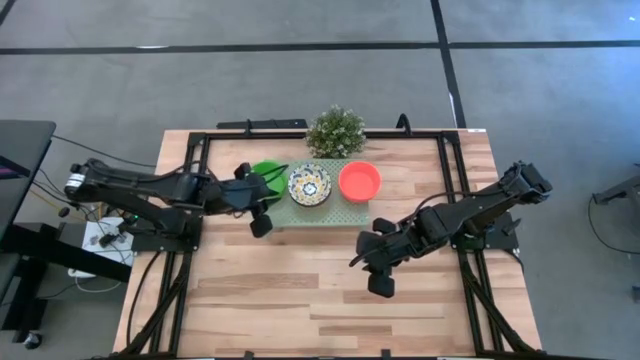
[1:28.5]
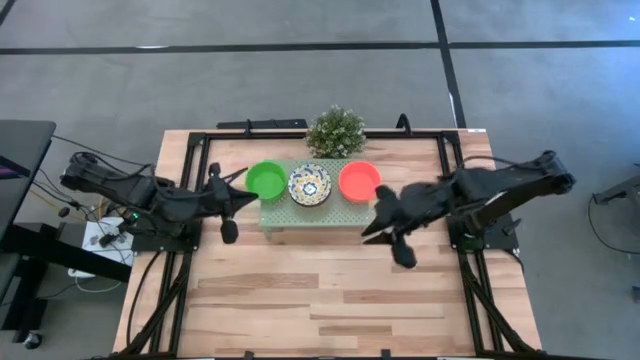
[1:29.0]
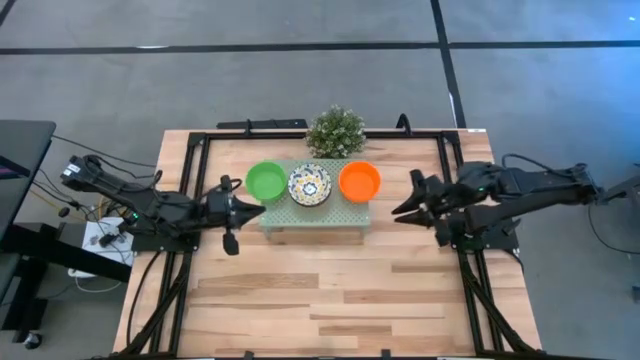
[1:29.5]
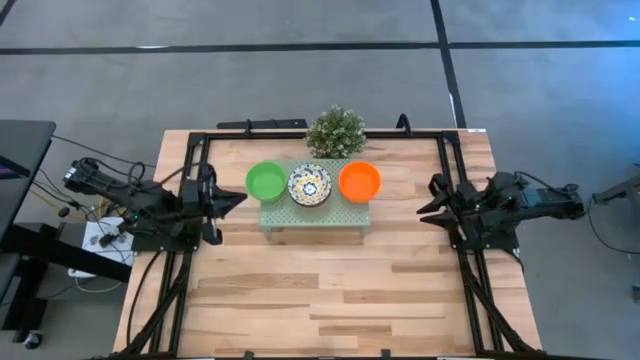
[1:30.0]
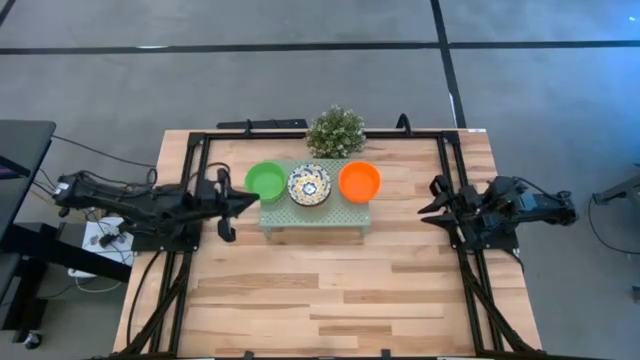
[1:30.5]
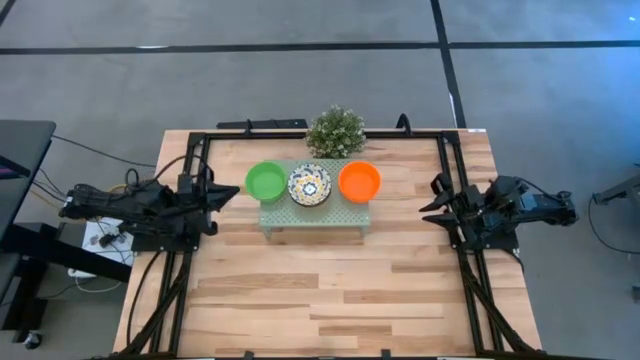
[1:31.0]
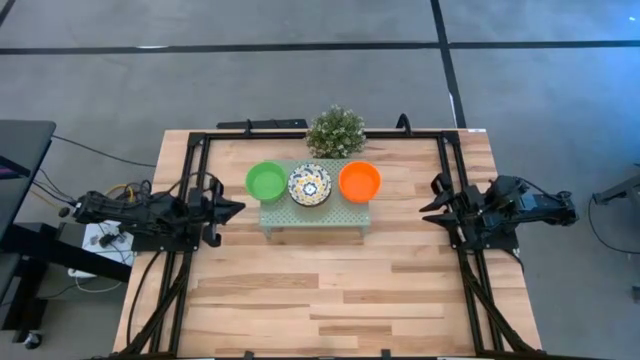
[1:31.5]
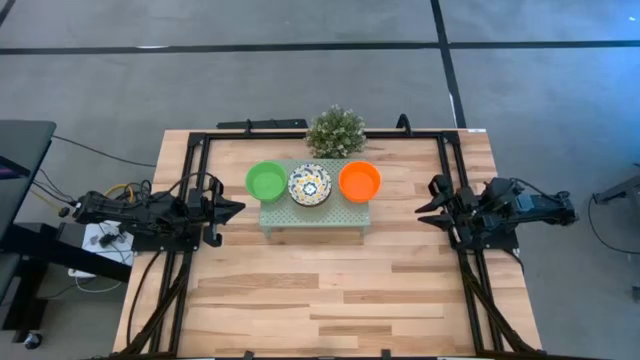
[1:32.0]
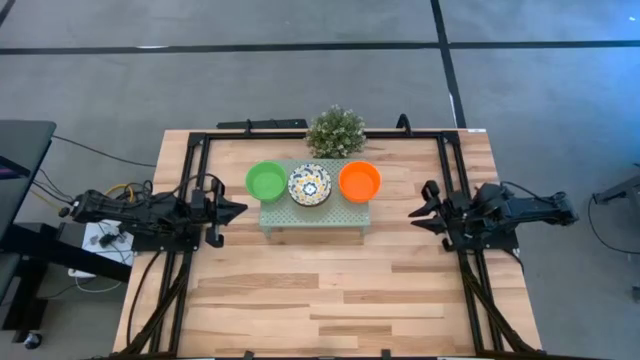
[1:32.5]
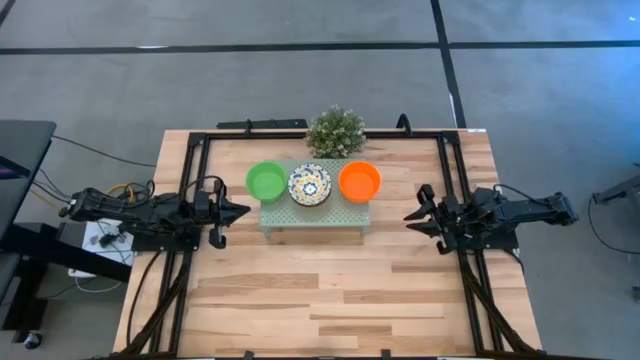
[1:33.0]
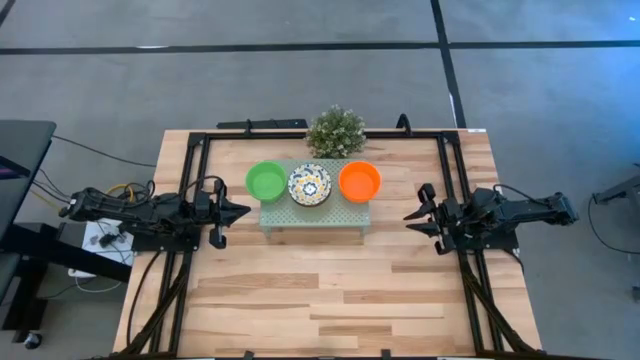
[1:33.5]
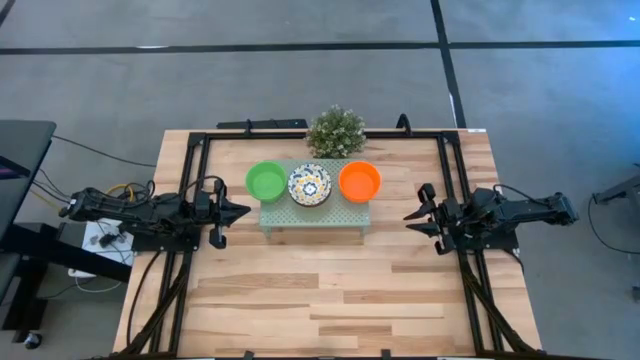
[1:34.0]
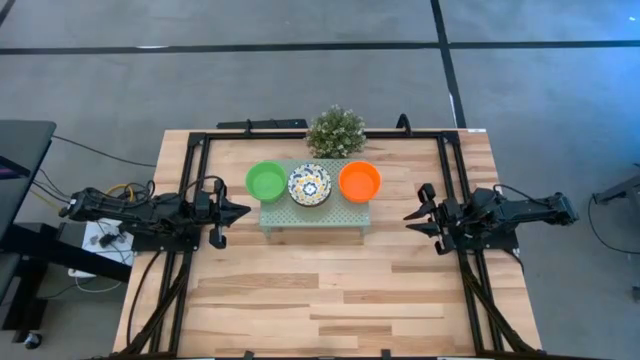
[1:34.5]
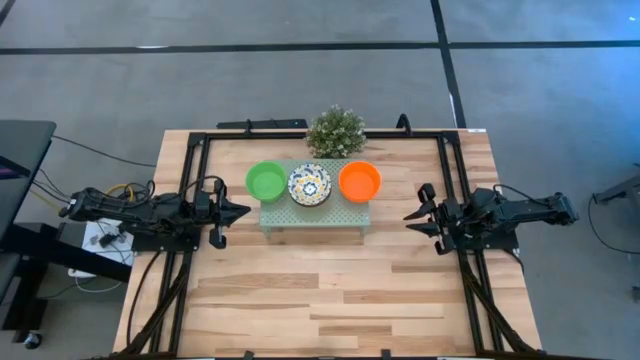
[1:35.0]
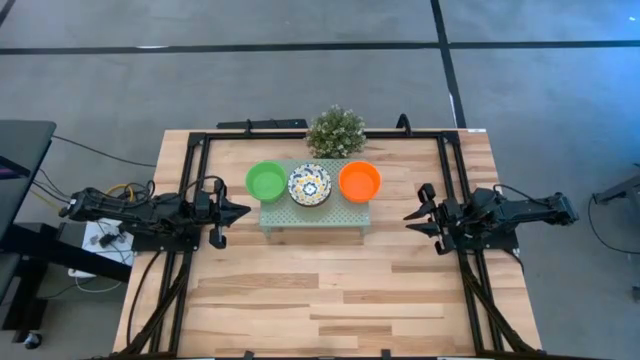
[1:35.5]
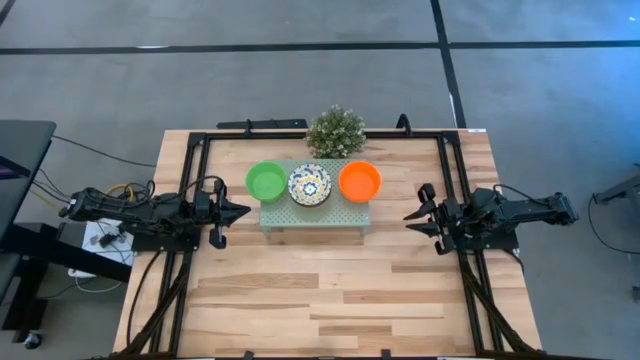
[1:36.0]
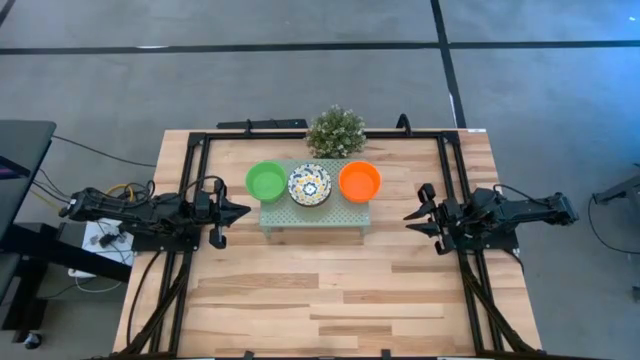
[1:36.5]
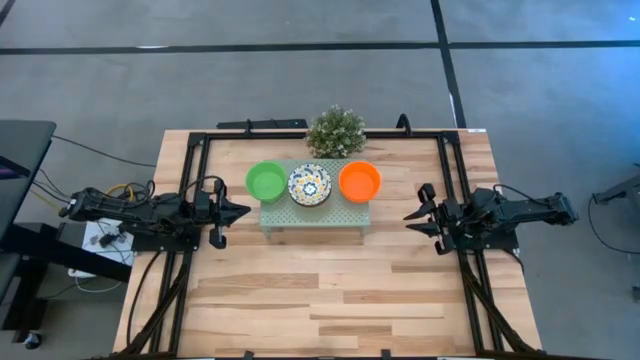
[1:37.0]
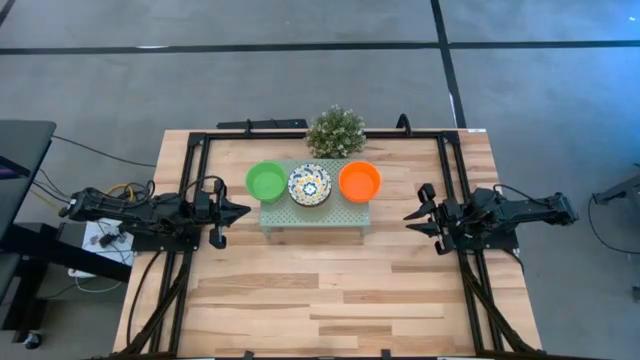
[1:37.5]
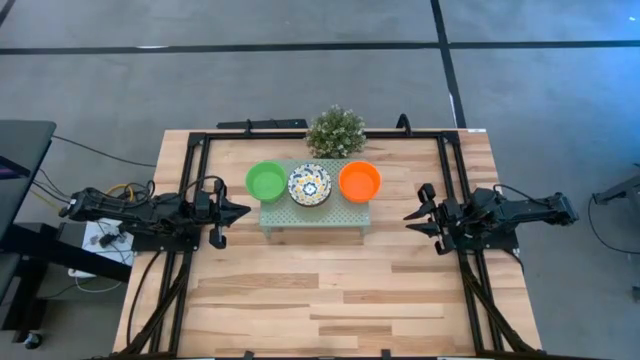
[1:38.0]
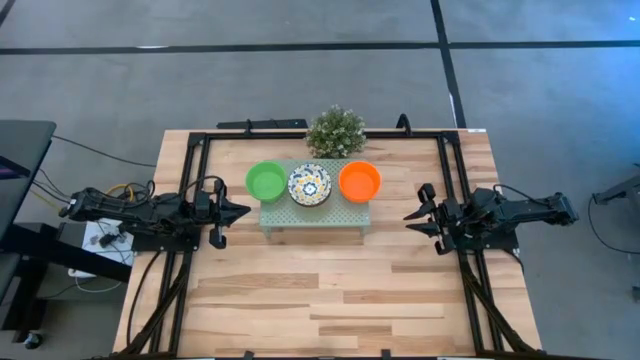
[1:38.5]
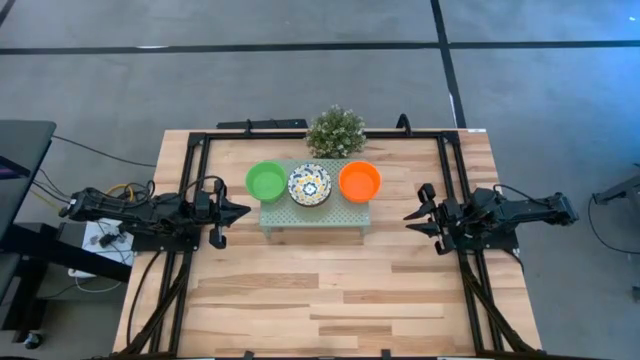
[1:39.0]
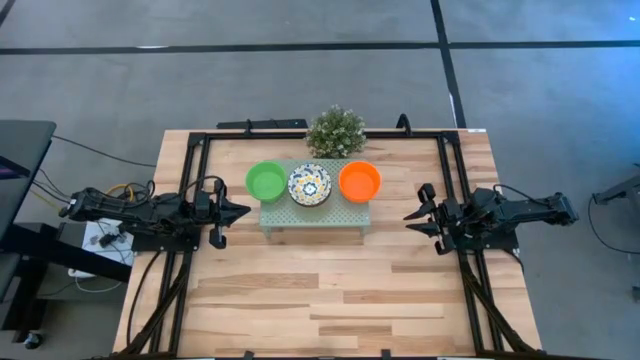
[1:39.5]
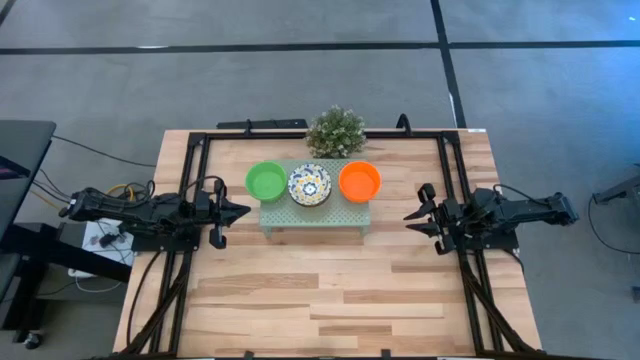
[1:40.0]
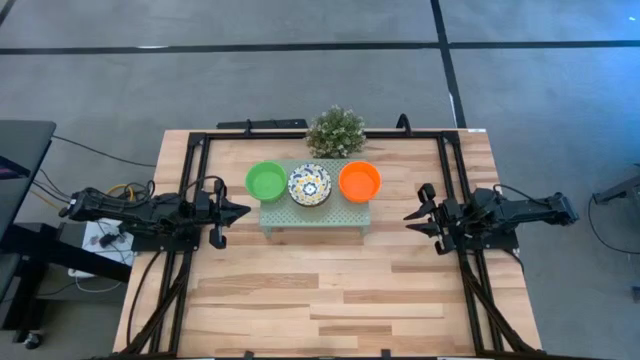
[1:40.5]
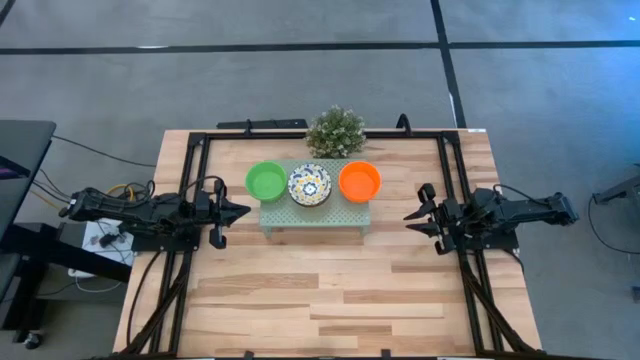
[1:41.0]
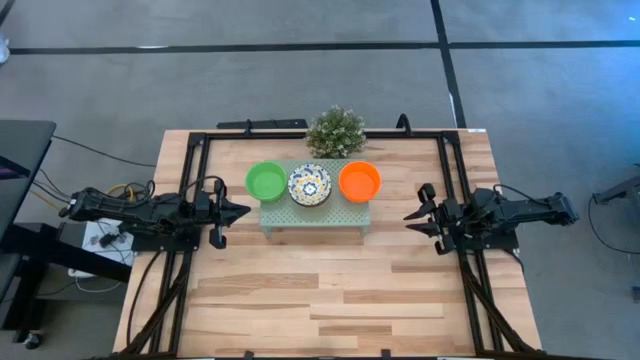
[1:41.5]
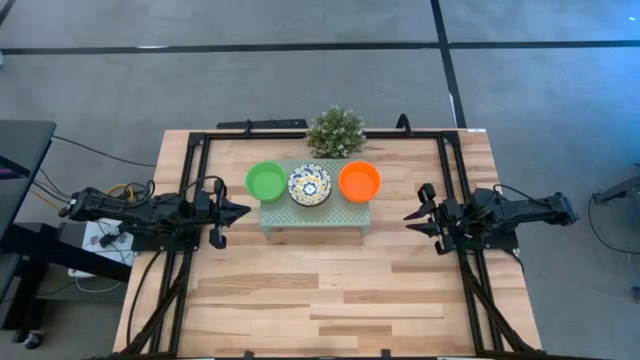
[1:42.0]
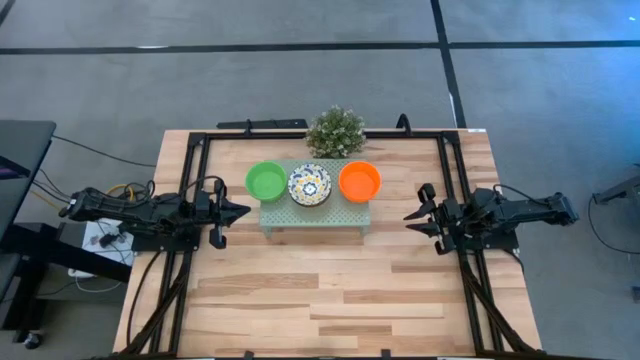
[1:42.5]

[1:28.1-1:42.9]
Task: Pick & Place Mini bowls
Return to Home Position

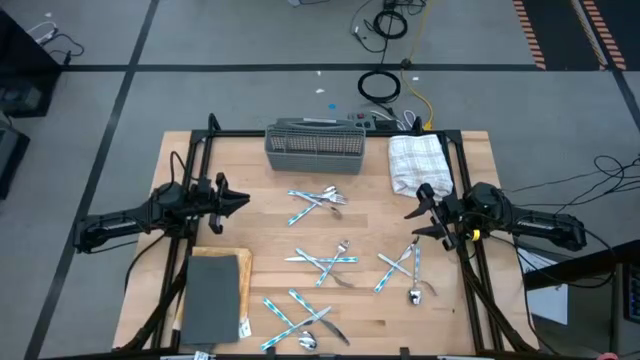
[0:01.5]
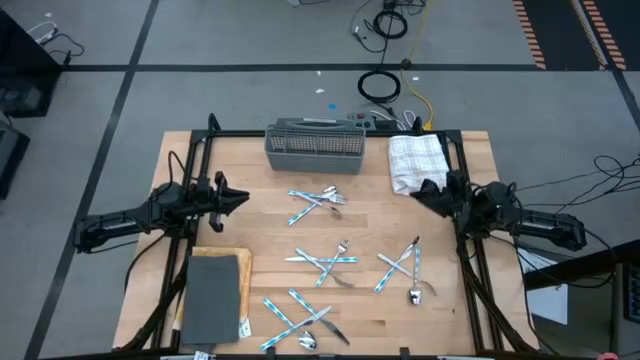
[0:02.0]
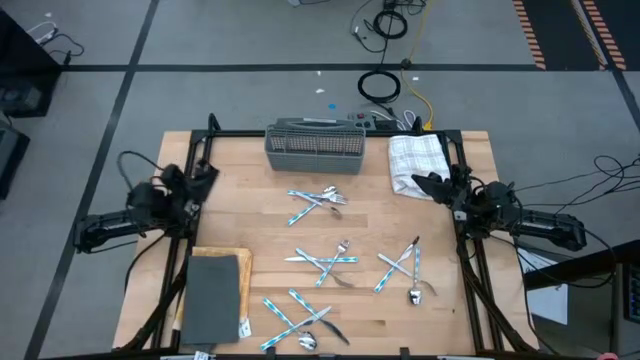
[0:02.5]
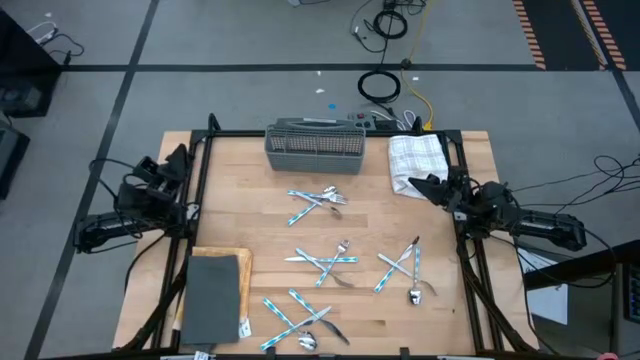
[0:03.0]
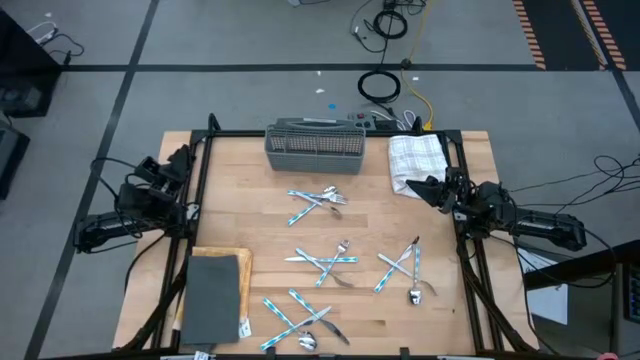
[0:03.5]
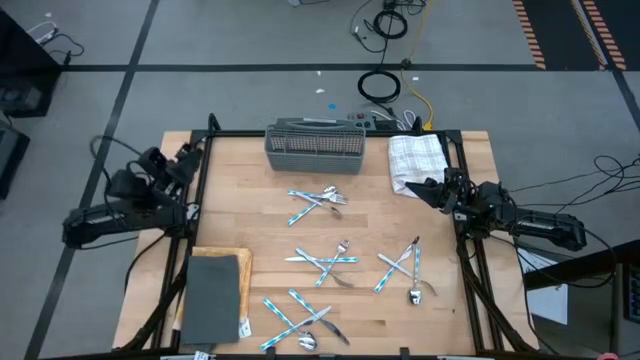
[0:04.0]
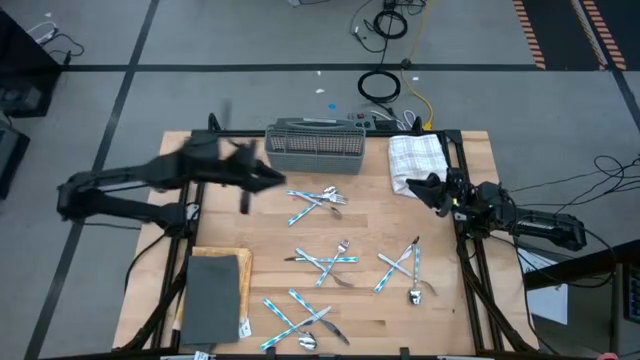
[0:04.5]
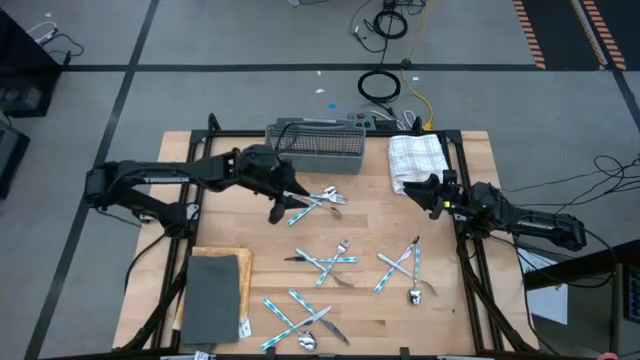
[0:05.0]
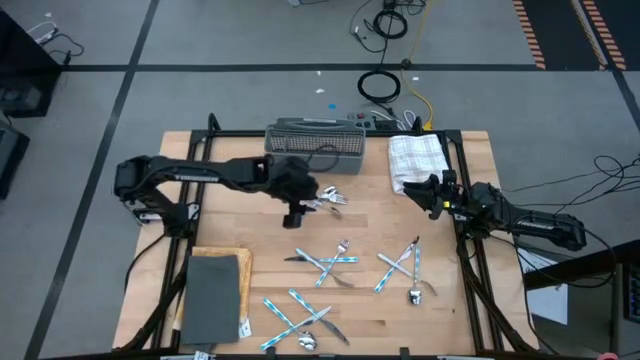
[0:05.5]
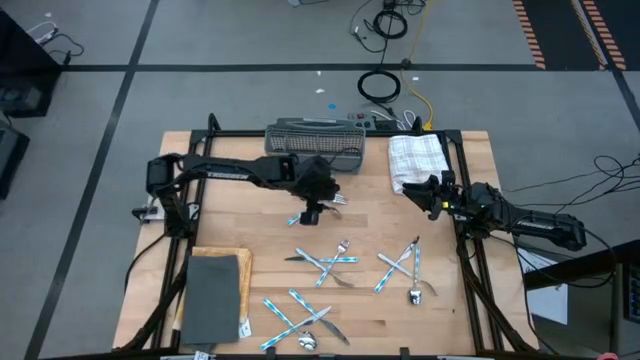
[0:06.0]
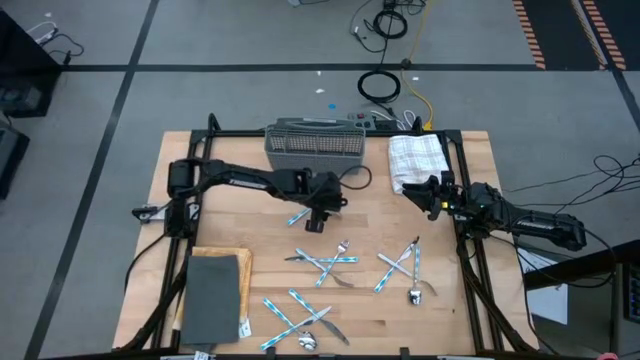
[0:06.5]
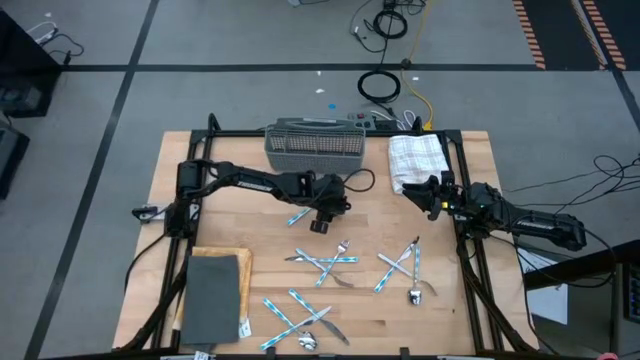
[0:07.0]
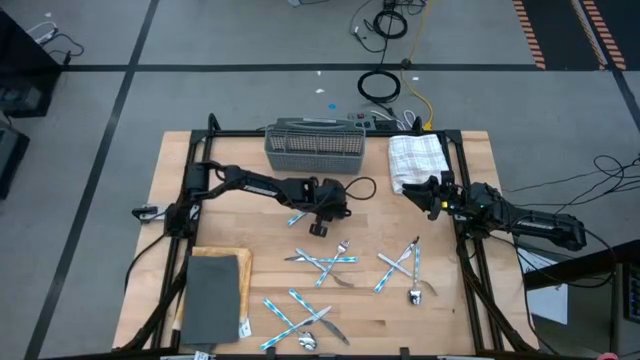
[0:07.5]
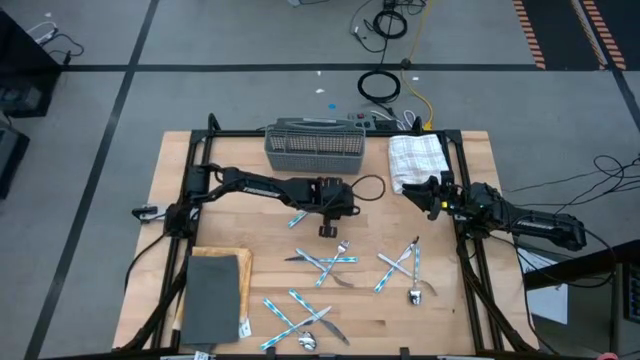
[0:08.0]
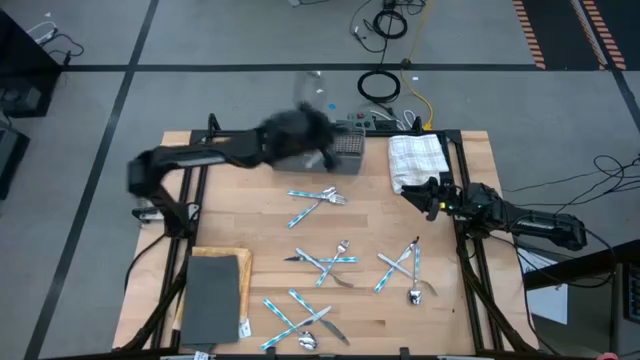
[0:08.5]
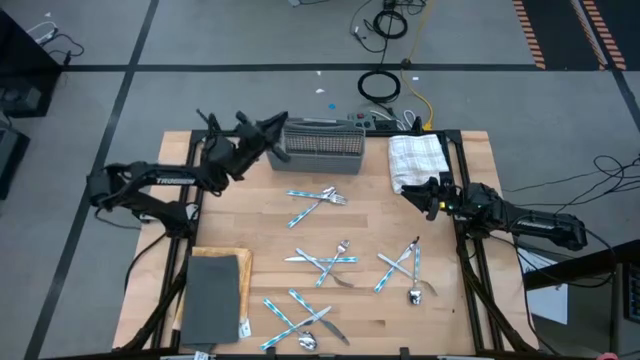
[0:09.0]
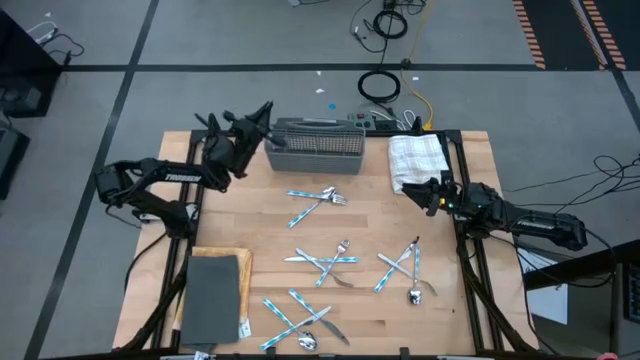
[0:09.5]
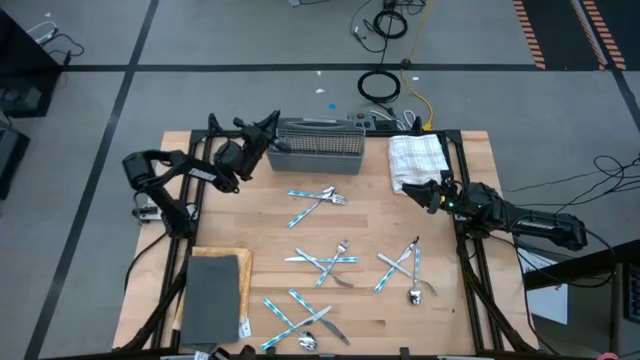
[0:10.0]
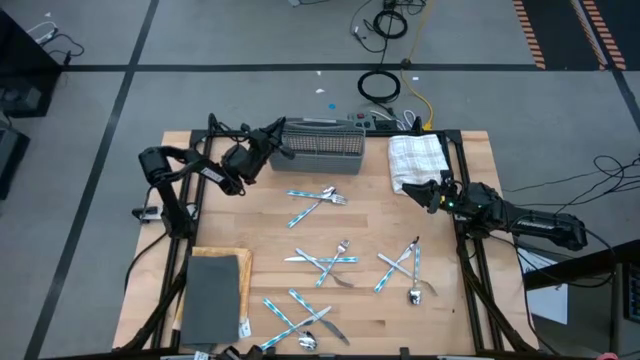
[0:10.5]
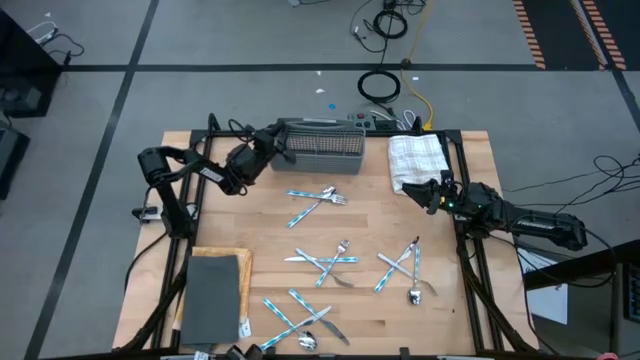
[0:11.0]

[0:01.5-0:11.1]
Task: Sort silverware
Put the blue spoon into the silverware basket
